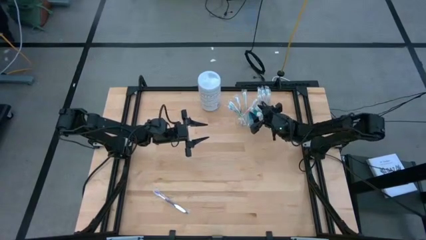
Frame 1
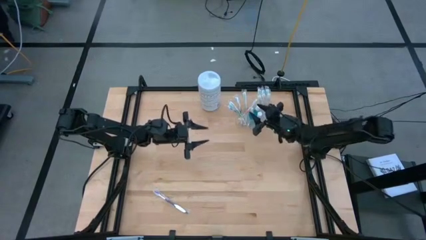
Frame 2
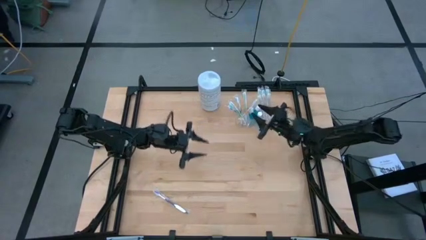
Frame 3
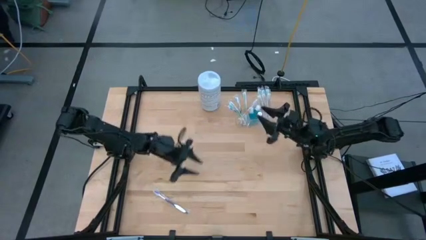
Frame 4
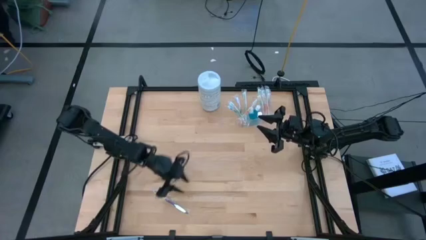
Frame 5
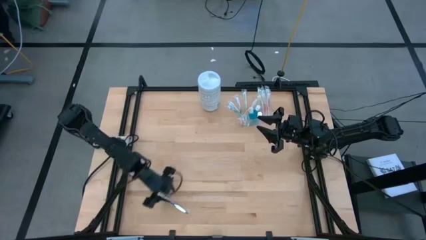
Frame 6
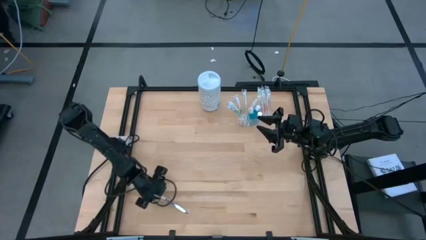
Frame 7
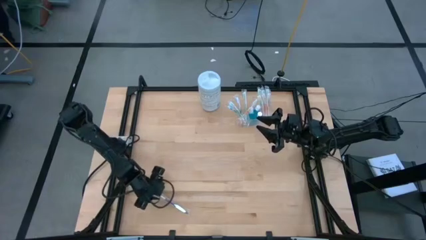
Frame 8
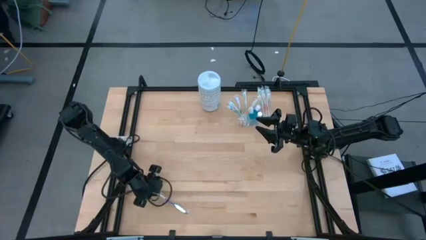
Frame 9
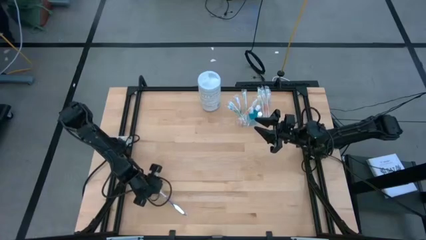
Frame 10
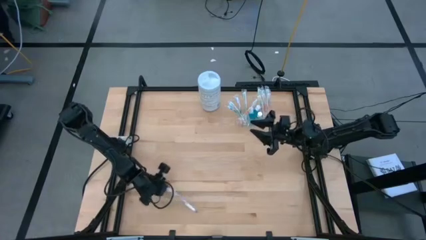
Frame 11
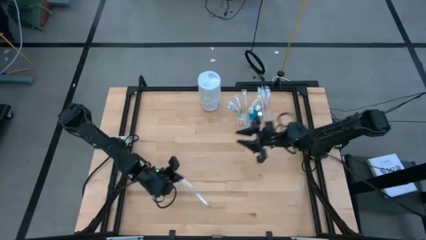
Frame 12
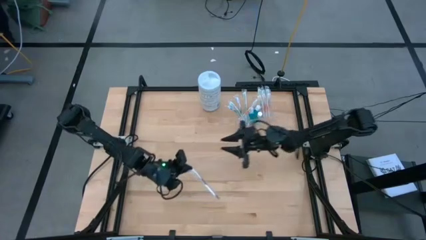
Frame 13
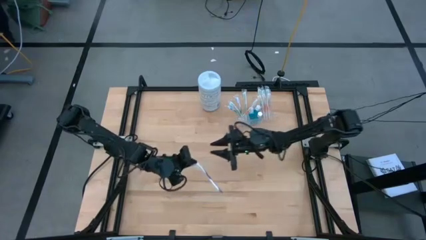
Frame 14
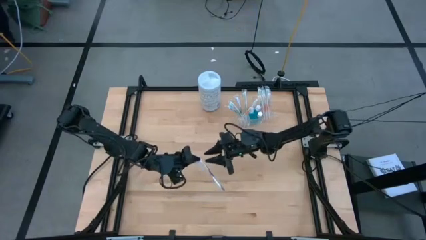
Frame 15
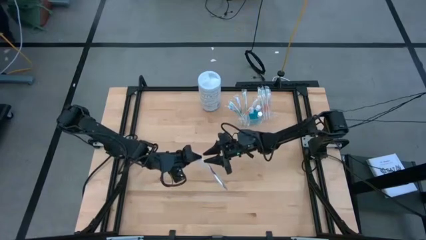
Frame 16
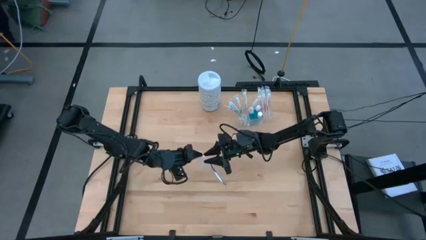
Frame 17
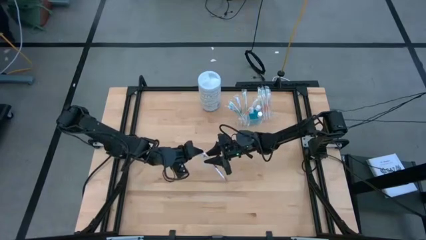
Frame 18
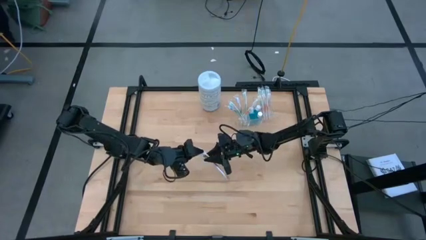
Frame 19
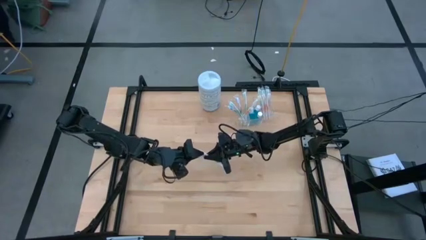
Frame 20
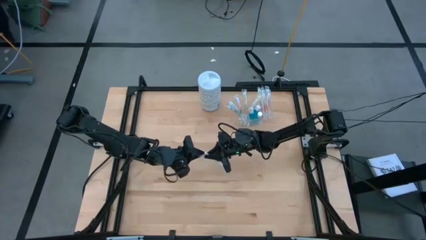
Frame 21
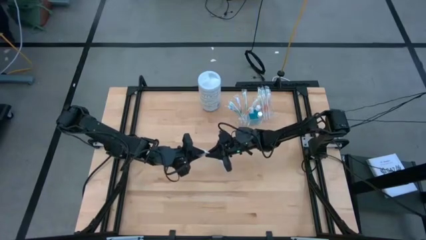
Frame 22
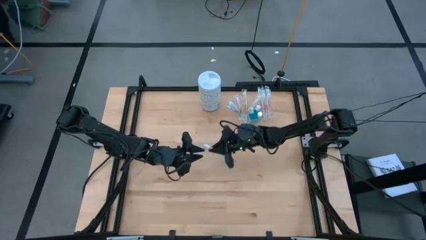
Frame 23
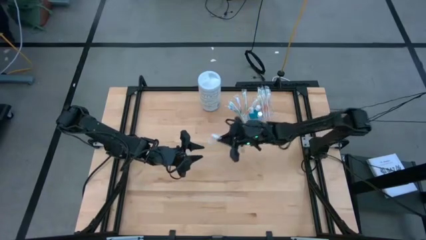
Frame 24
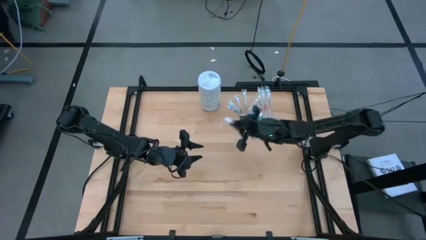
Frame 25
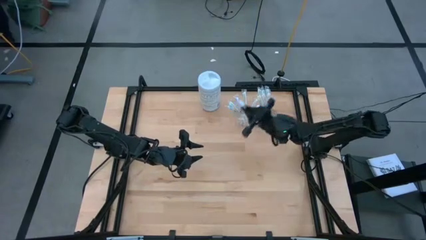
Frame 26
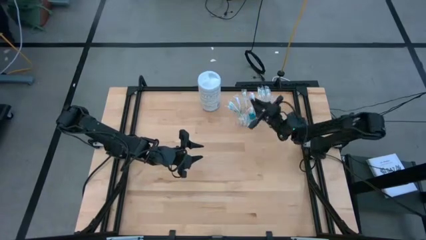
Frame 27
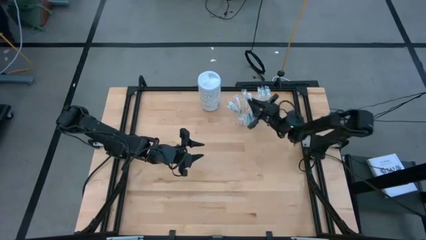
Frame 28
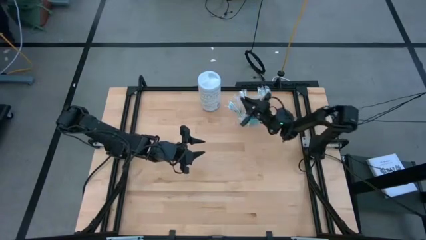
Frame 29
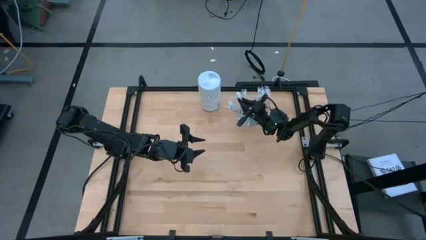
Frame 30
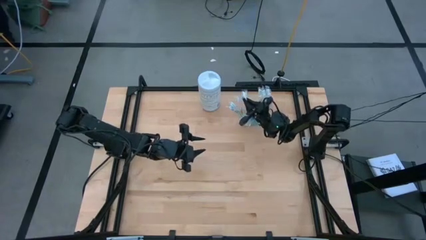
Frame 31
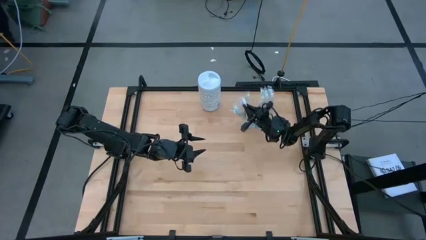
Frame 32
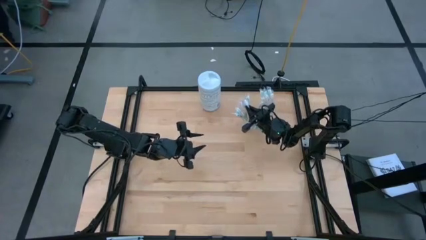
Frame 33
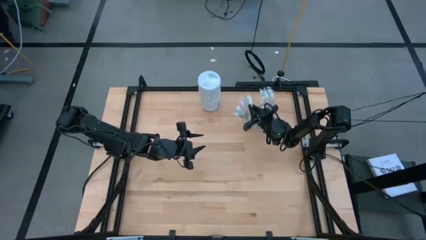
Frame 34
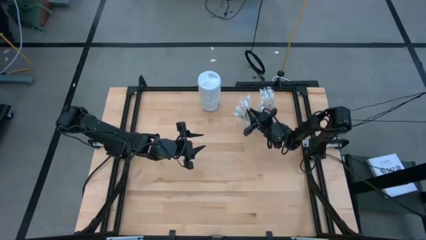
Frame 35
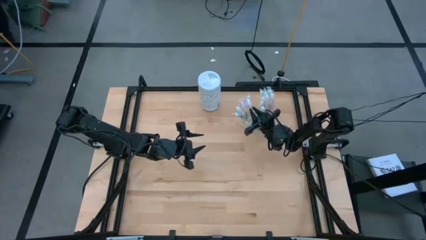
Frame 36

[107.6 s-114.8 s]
Task: Pick & Place toothbrushing station
Put the white and purple toothbrush into the transparent mesh organizer

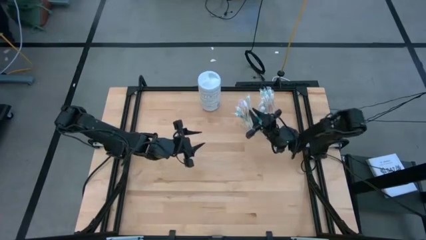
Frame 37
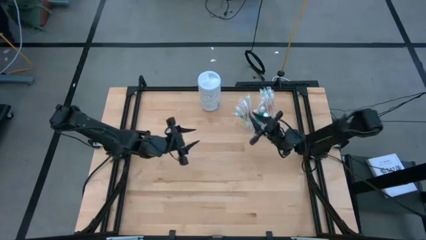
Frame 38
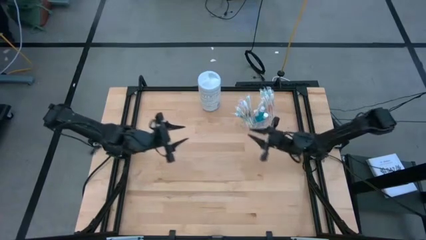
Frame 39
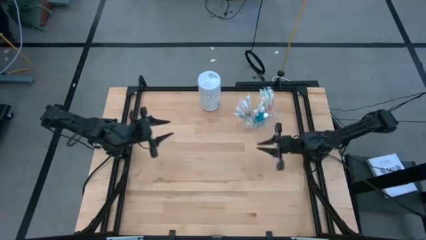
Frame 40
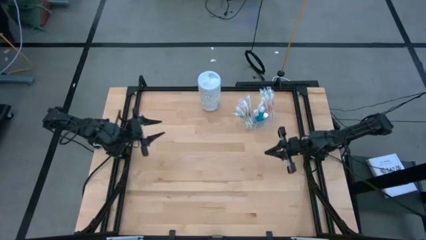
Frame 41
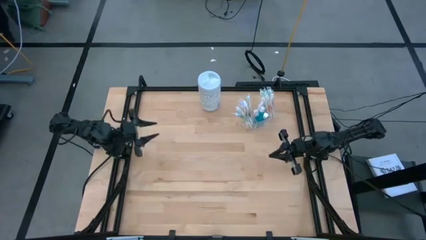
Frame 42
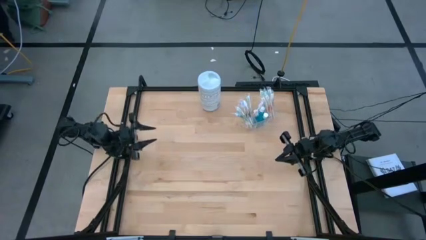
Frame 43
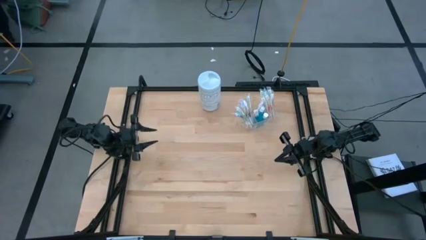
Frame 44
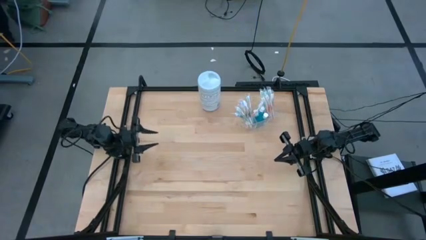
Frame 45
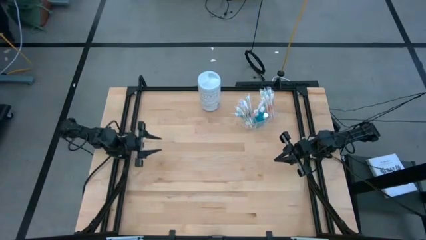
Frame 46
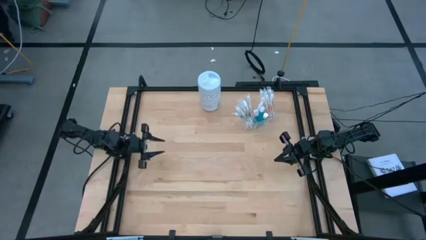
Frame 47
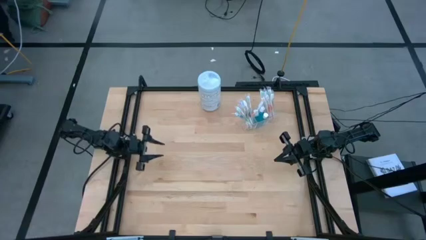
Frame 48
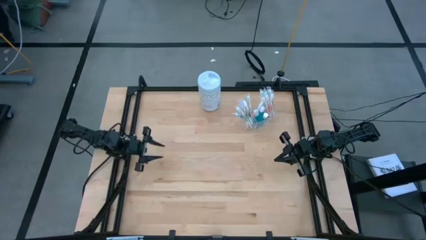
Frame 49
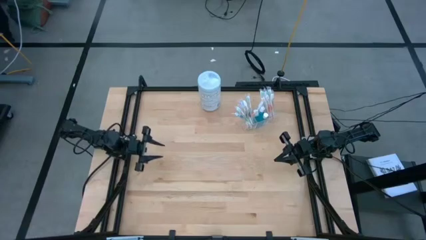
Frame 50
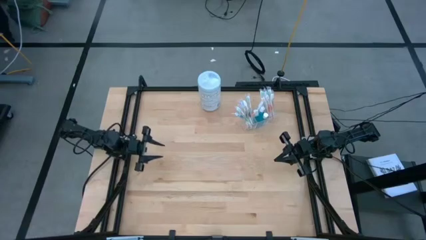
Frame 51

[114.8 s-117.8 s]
Return to Home Position

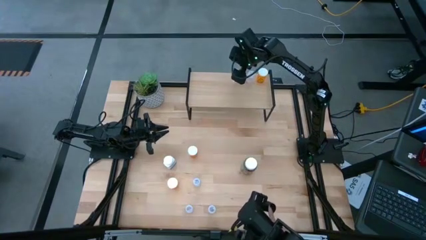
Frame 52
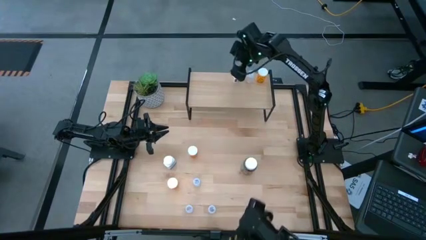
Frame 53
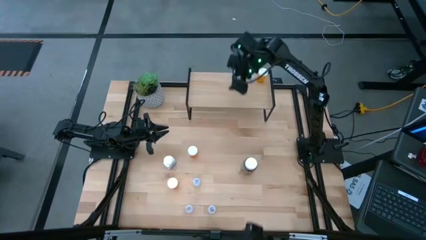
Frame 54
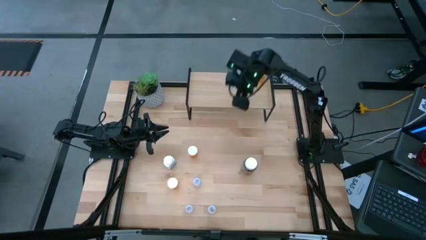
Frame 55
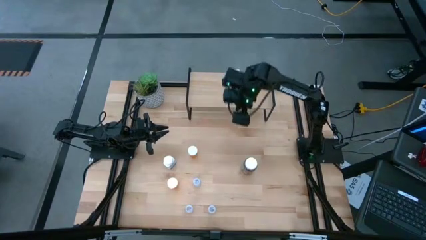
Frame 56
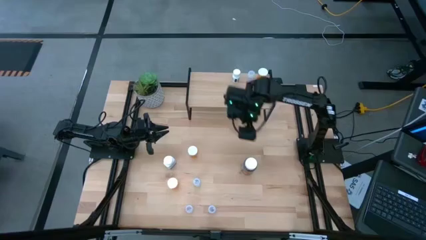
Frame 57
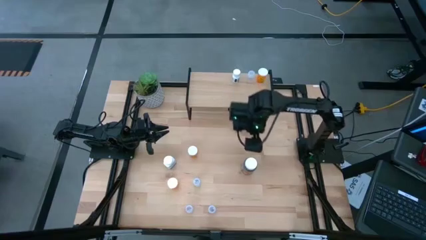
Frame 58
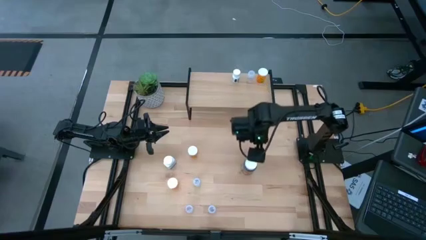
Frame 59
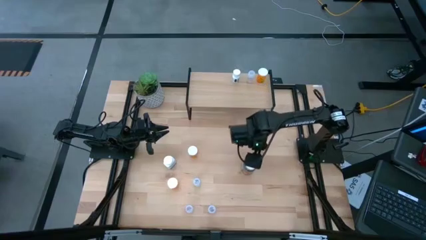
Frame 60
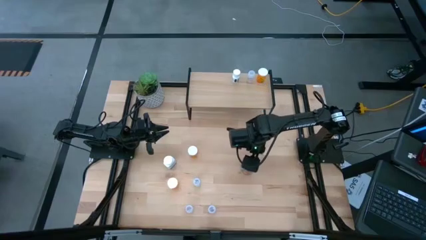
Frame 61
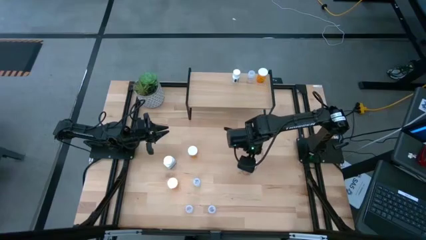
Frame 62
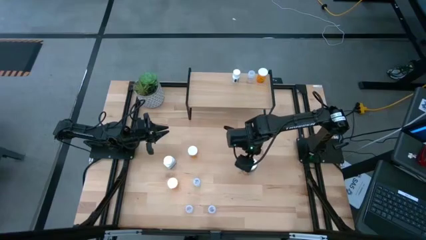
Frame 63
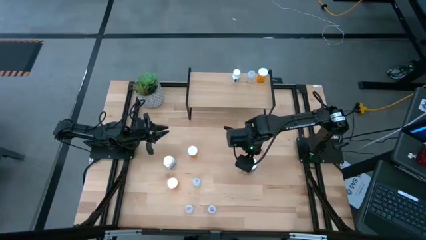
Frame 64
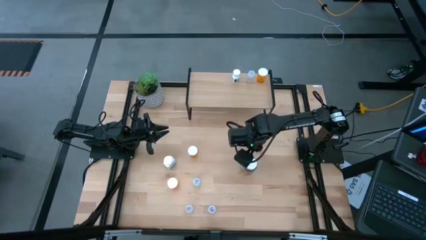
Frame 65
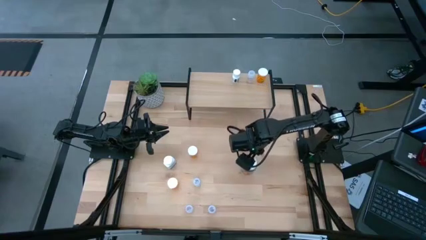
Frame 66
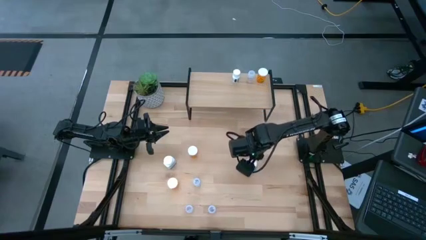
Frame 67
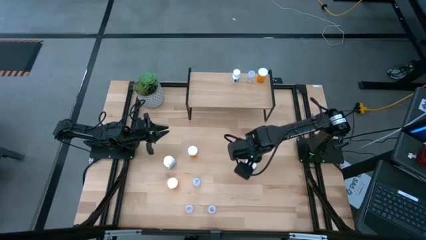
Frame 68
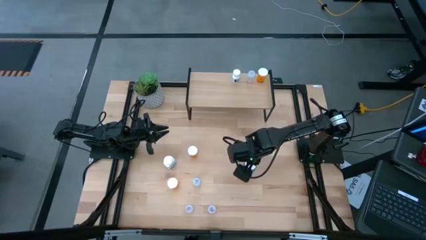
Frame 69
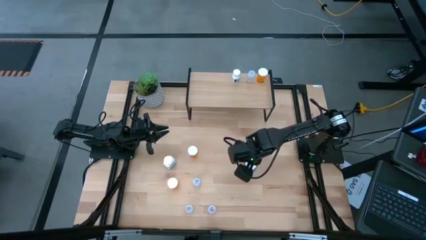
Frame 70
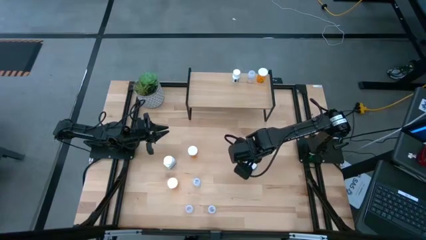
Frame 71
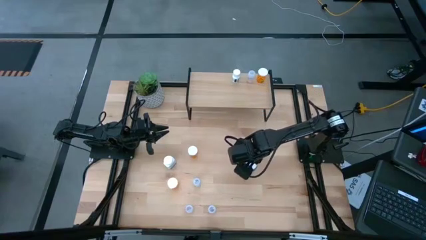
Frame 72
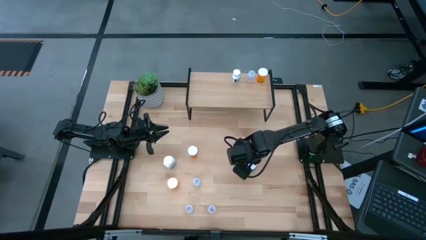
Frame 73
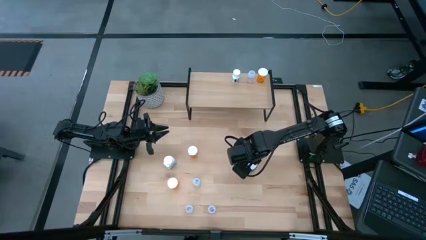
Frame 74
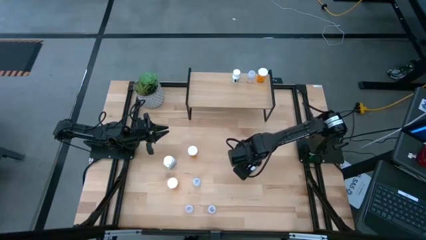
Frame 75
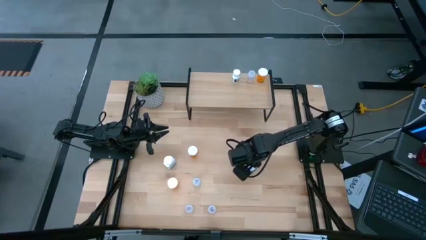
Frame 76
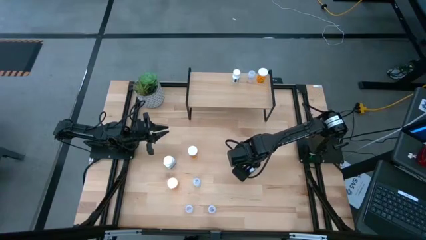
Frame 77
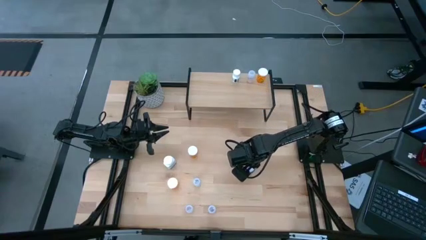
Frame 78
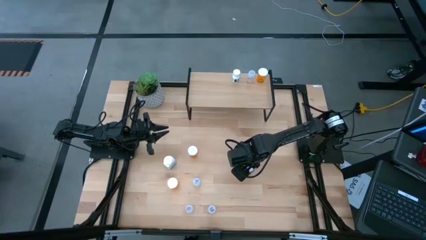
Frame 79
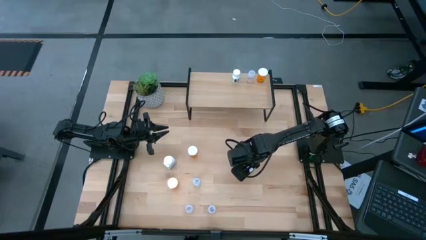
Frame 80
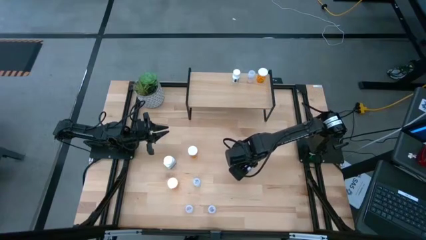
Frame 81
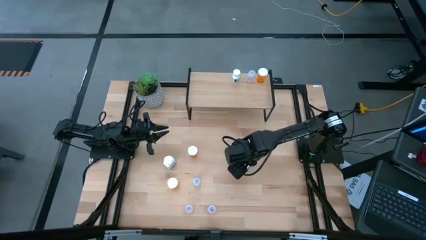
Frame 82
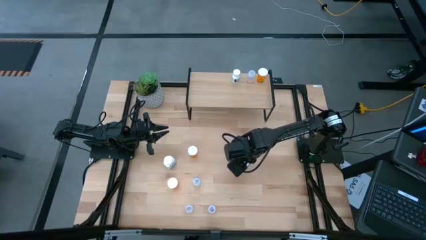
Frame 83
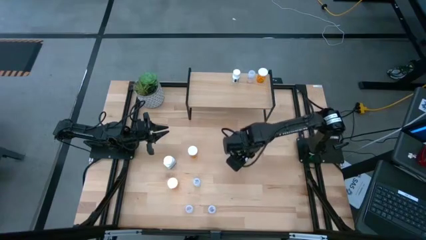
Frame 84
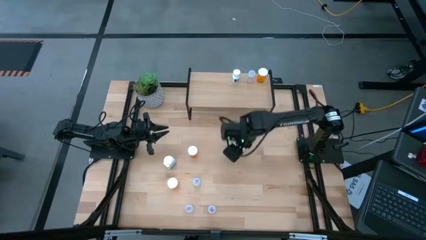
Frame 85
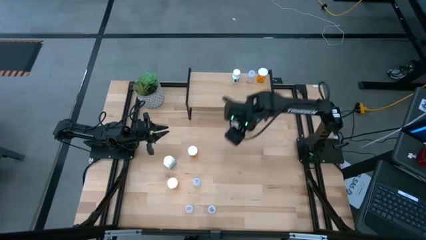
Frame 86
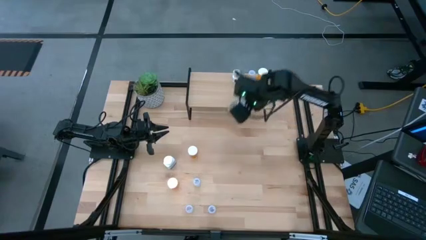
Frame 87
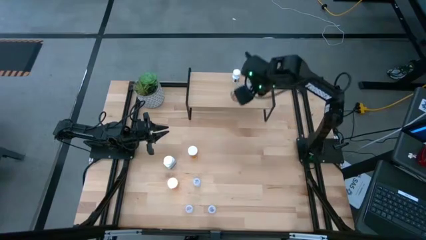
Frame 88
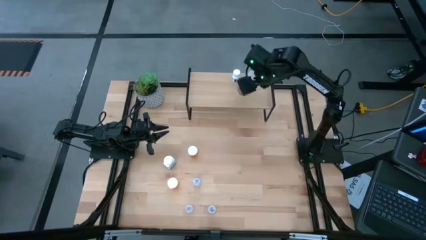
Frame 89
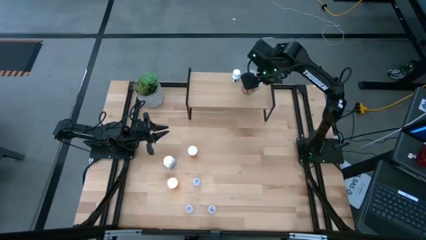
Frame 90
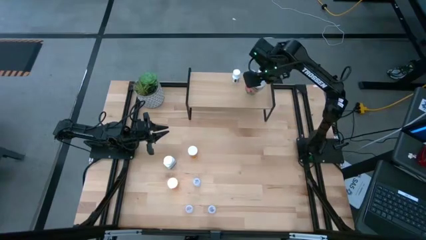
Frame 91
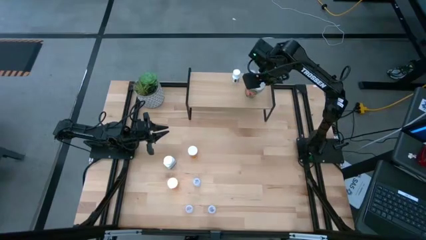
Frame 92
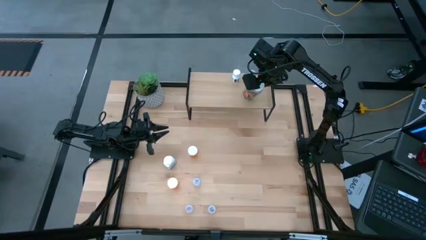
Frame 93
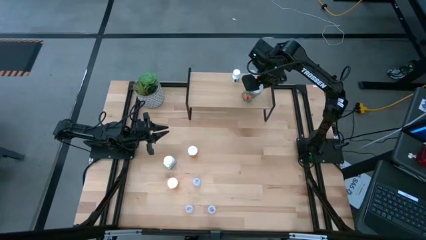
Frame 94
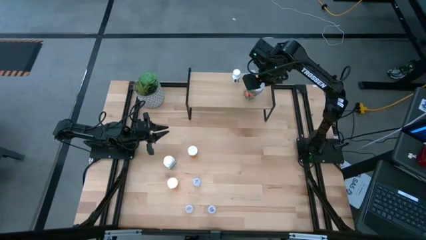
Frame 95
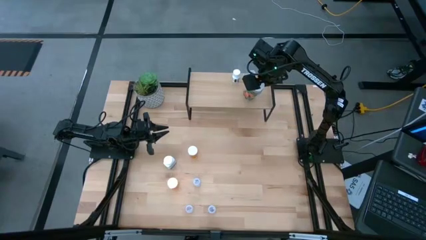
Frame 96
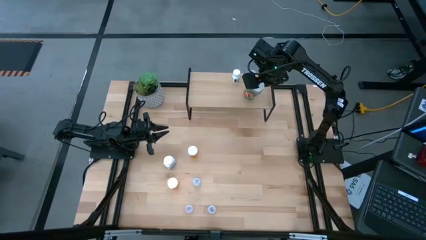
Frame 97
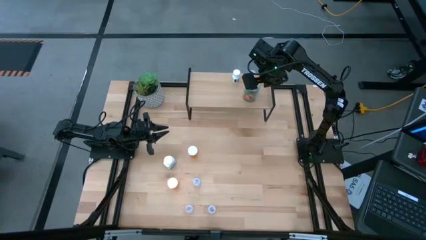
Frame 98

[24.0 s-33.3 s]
Task: Pick and place medicine bottles onto shelf by color
Put the green pill bottle on the shelf
